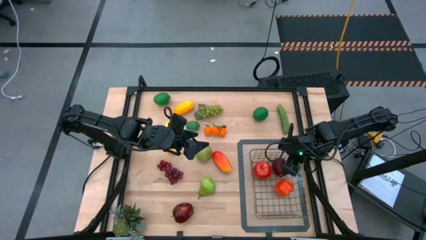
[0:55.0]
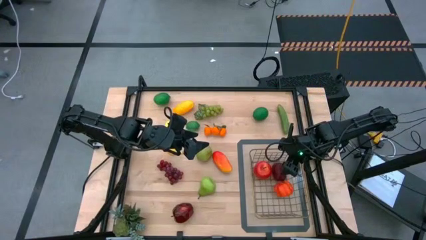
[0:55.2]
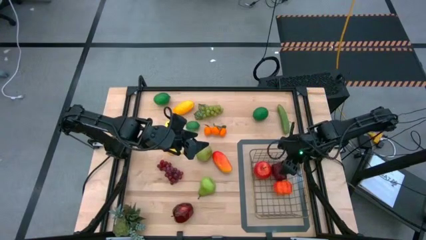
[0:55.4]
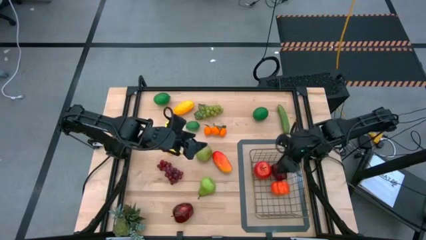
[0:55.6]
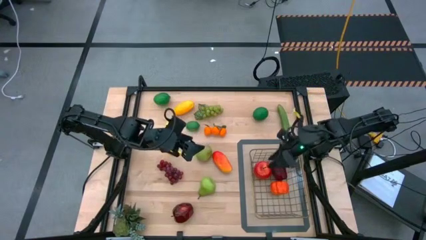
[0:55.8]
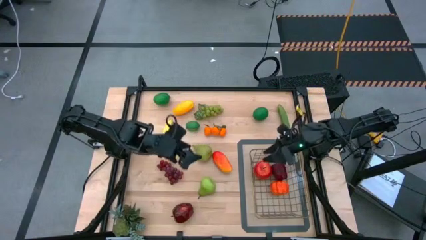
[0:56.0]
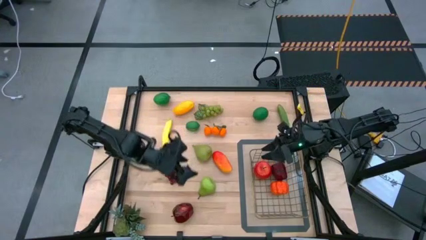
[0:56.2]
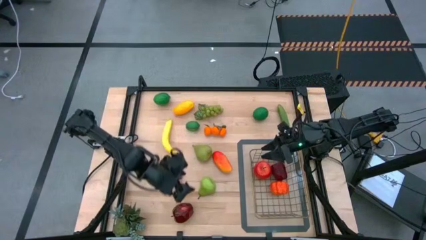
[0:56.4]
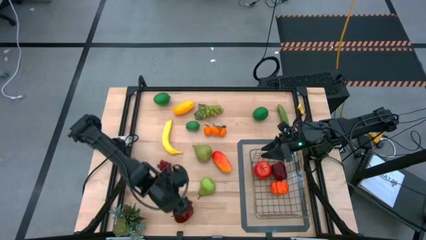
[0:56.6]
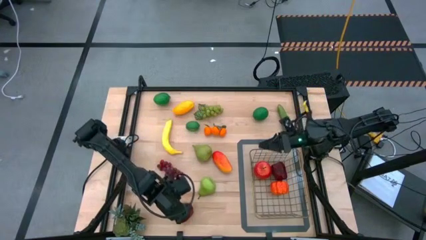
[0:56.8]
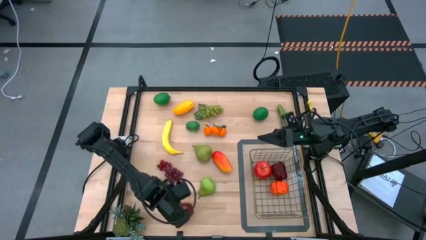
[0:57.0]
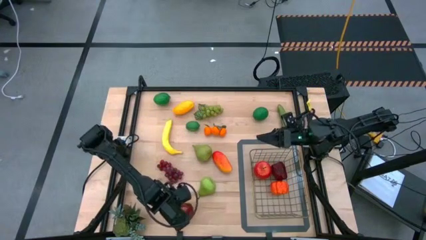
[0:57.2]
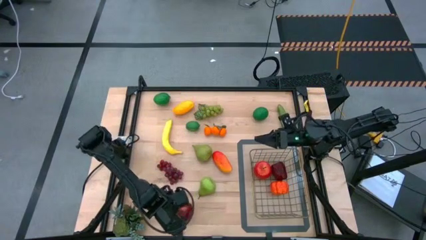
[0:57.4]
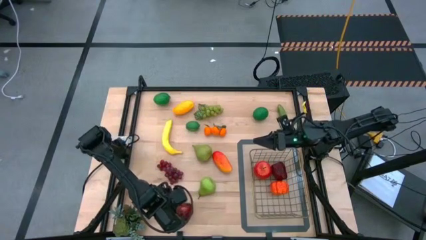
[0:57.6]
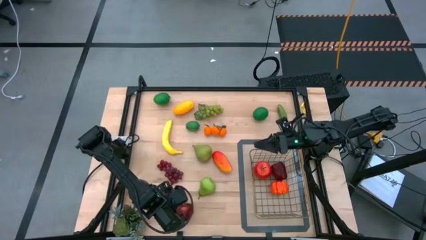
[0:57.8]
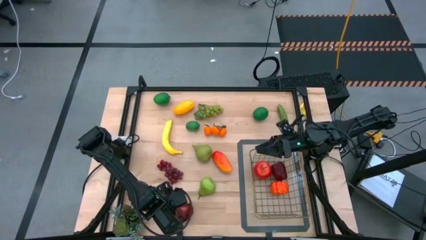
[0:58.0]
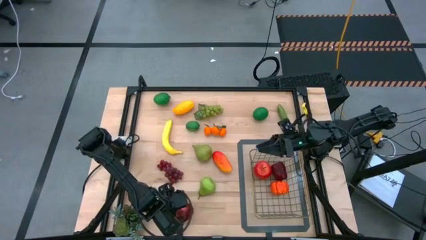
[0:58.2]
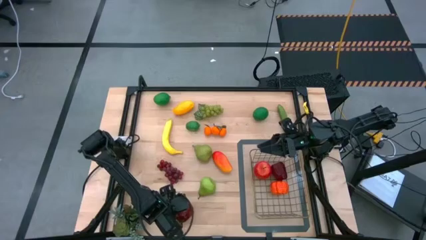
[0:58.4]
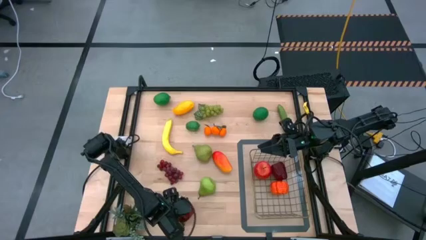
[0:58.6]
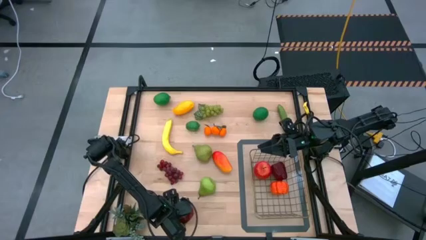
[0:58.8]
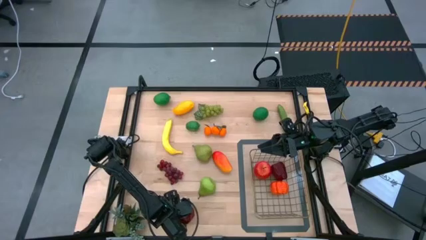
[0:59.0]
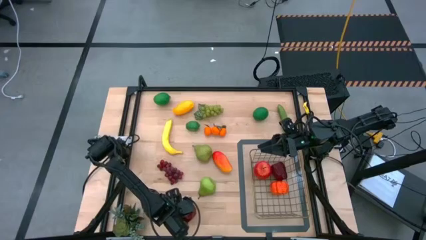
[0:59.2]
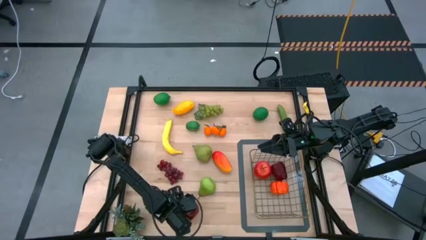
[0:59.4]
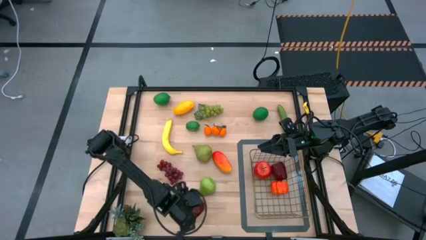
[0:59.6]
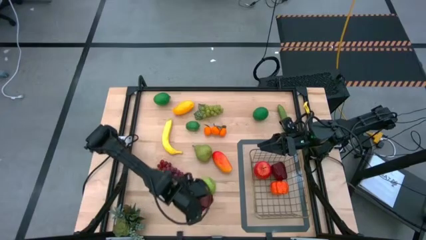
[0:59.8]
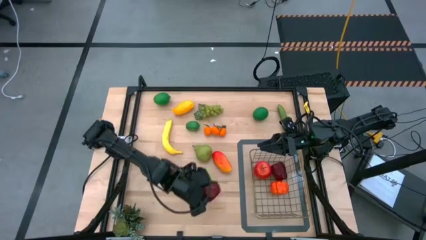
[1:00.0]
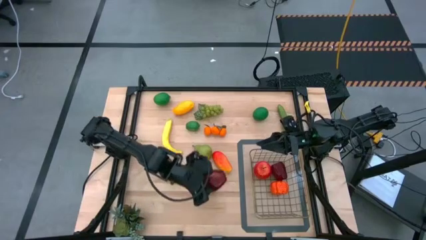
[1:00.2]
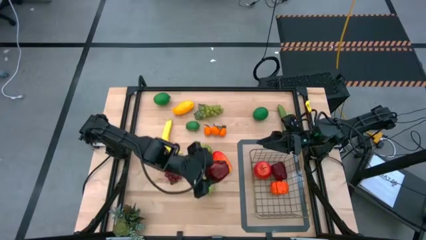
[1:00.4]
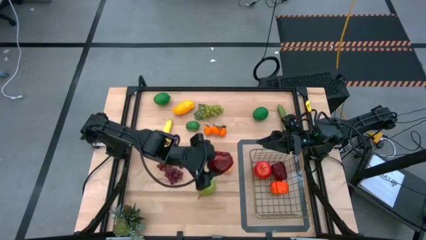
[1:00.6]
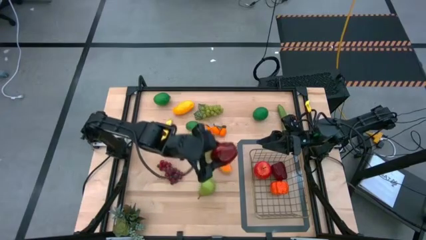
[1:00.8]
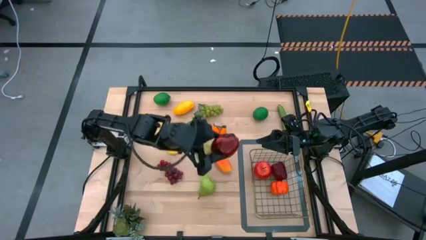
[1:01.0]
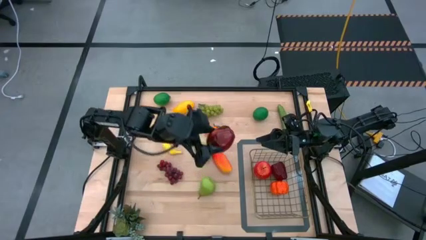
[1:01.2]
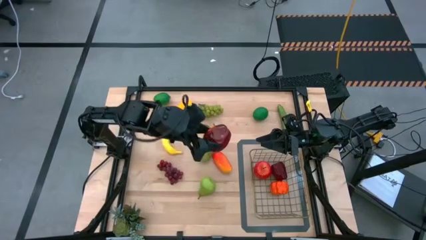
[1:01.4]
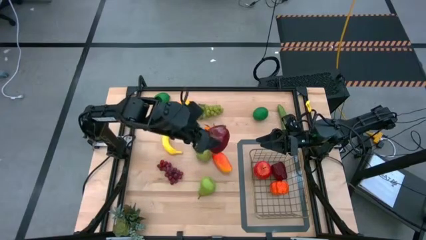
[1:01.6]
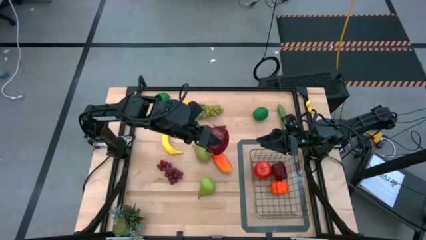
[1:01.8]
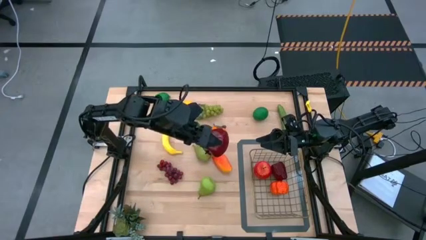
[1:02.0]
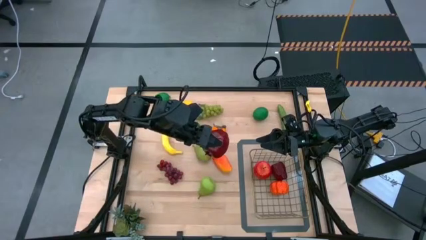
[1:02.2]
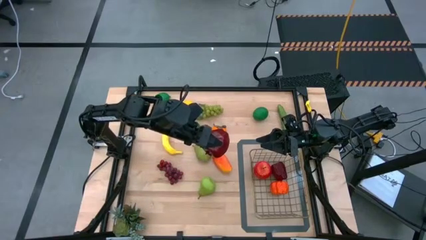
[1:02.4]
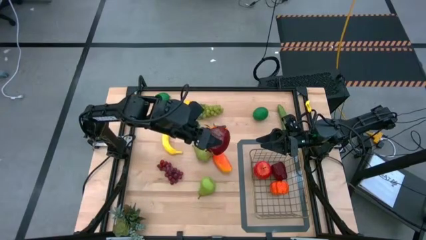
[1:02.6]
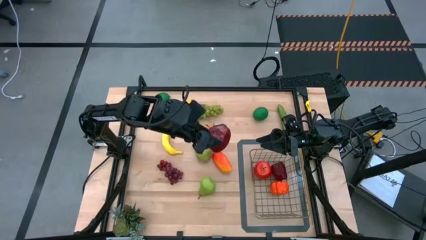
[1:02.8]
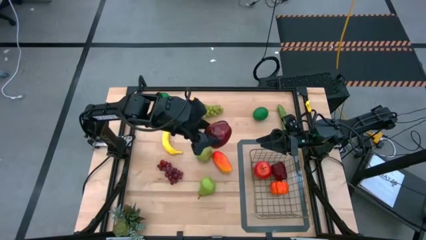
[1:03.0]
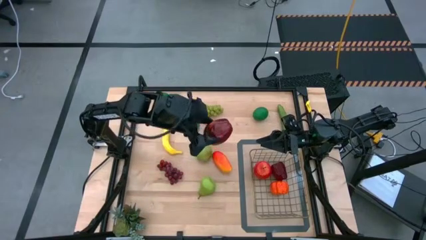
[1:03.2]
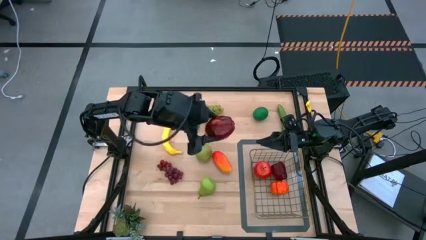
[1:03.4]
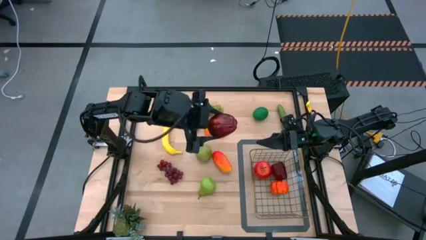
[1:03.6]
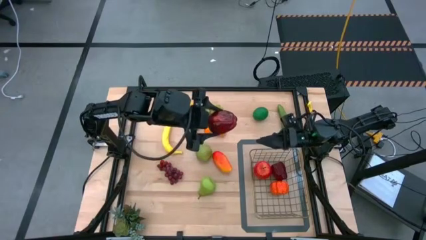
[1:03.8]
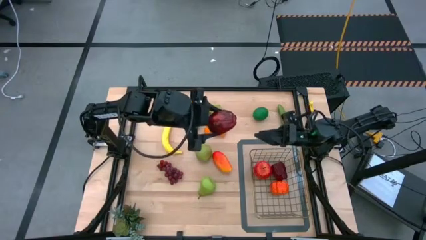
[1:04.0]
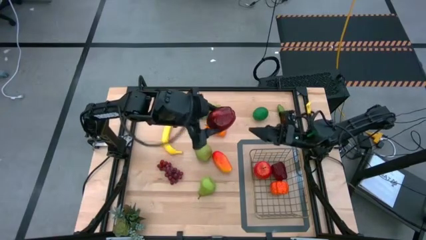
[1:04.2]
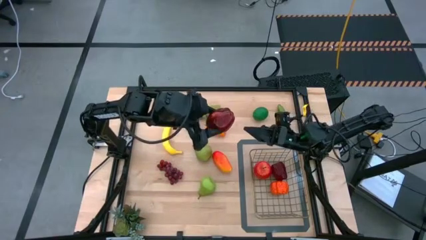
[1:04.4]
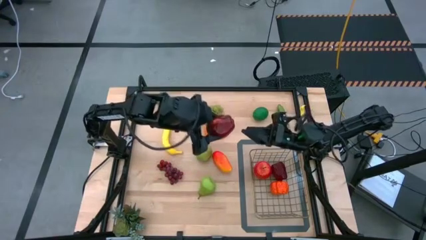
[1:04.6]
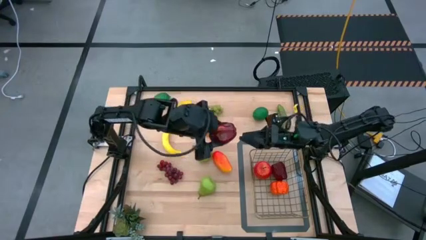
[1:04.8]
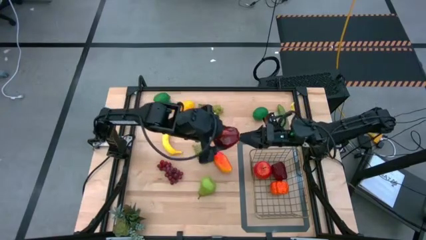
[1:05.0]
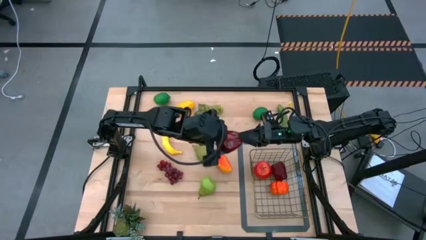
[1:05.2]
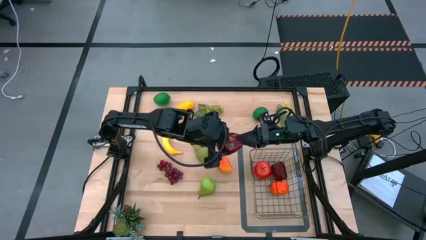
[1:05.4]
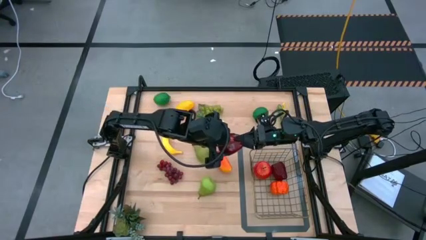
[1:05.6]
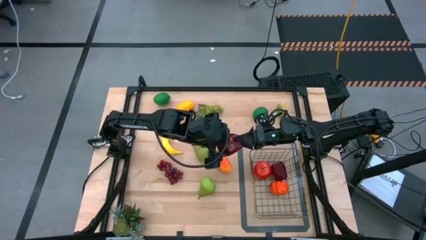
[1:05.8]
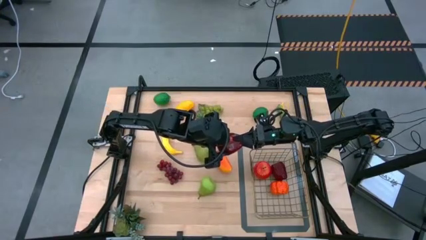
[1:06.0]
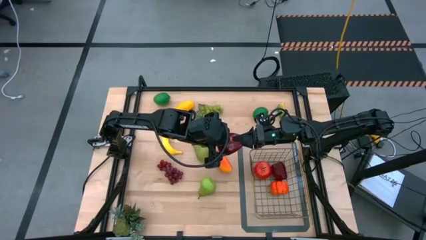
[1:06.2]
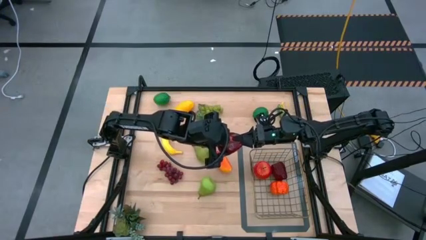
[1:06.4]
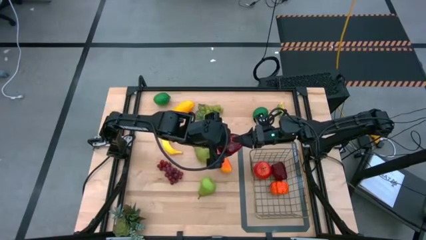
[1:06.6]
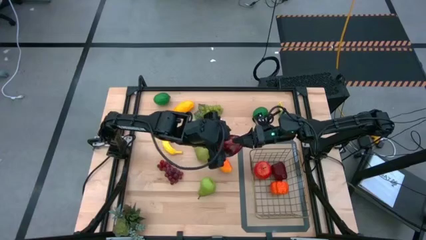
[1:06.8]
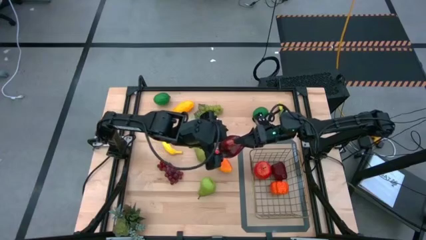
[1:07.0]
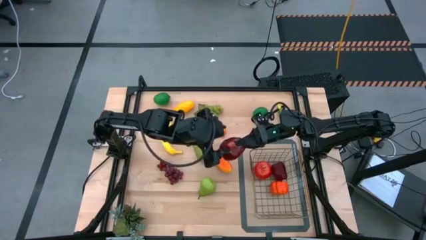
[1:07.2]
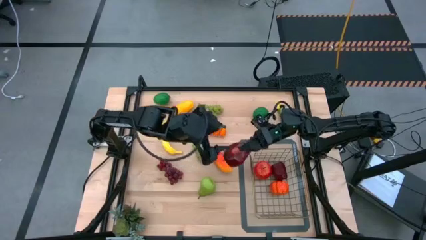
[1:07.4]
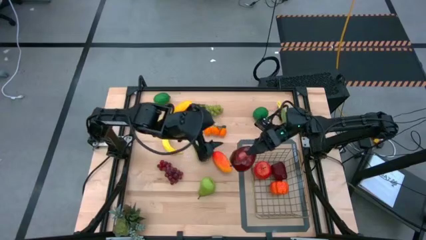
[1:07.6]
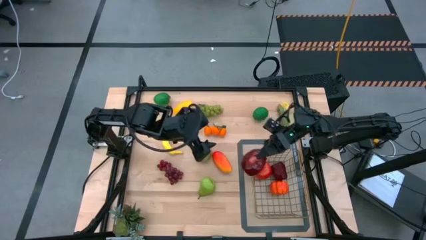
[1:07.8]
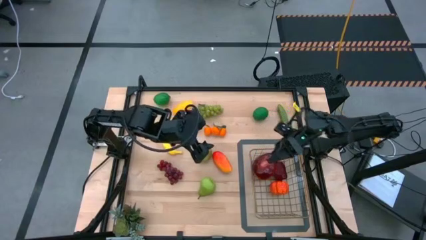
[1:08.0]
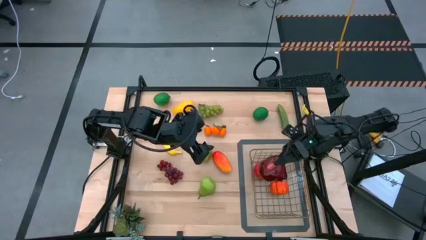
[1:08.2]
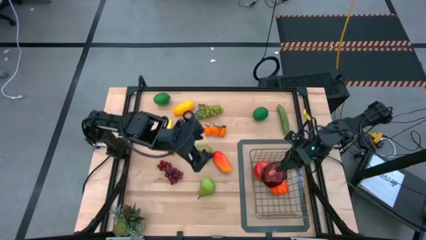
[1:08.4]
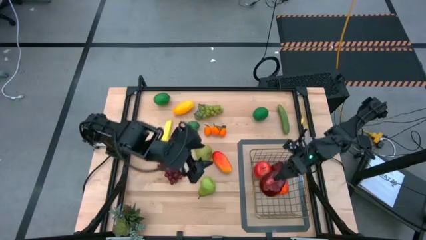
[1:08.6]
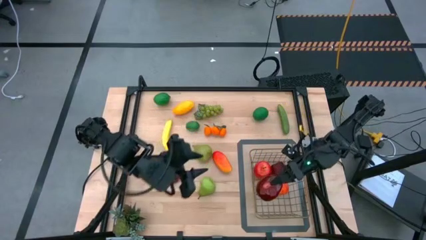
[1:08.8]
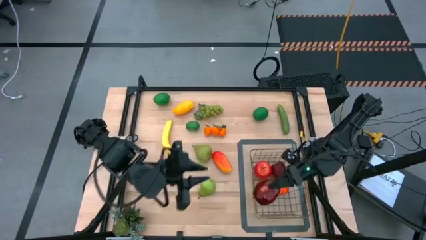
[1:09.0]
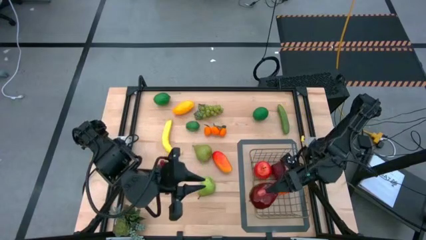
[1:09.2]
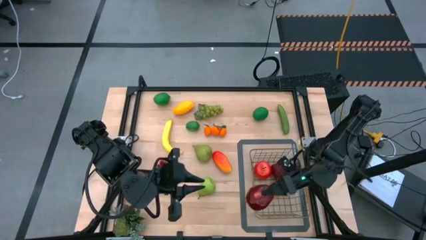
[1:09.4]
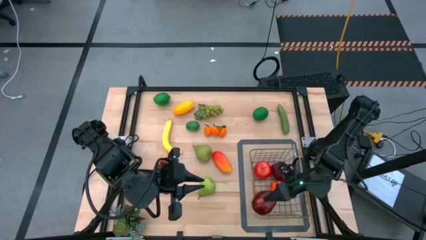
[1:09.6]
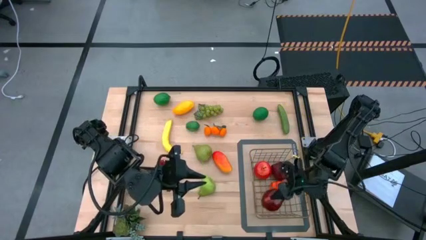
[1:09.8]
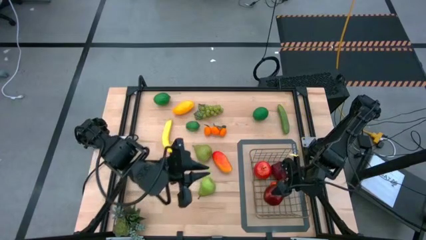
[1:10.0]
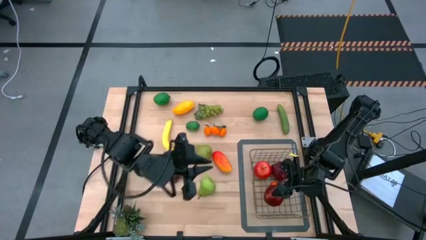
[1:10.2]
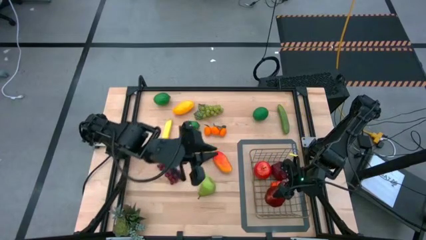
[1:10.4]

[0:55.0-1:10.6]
Task: Build produce basket
Put the dark red apple into the wire basket
